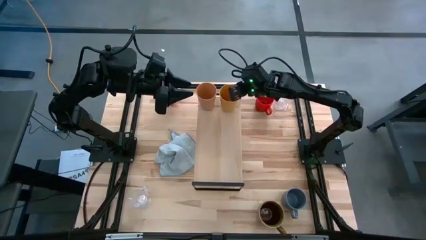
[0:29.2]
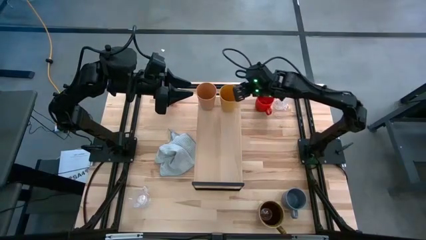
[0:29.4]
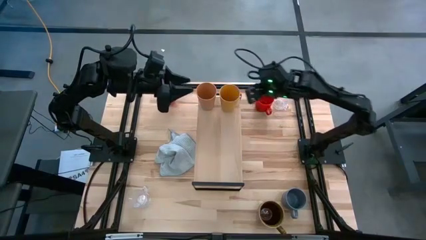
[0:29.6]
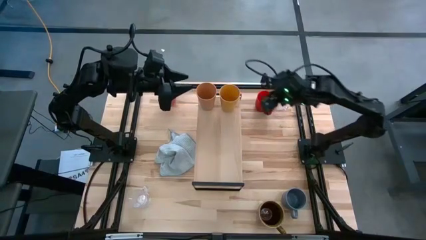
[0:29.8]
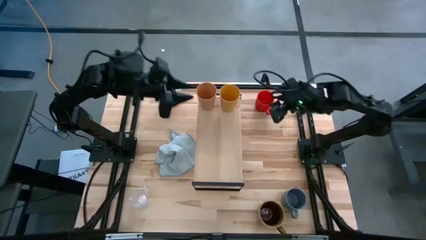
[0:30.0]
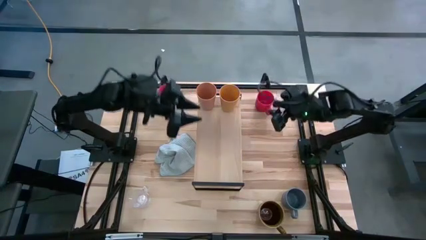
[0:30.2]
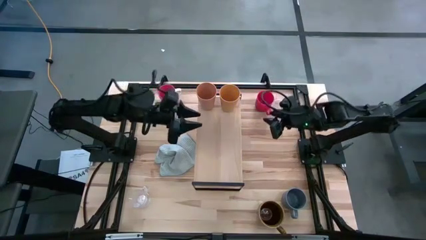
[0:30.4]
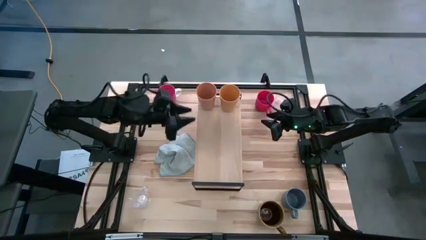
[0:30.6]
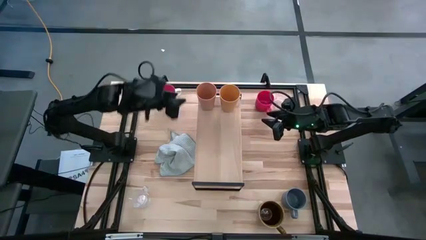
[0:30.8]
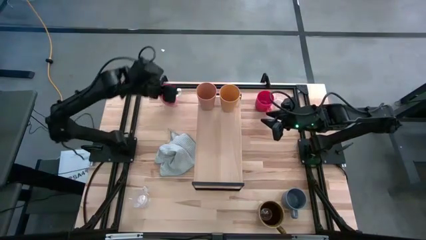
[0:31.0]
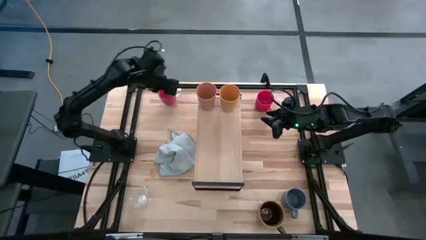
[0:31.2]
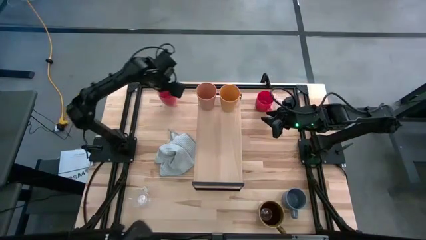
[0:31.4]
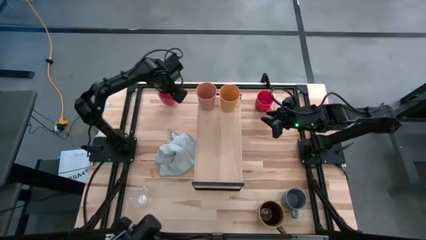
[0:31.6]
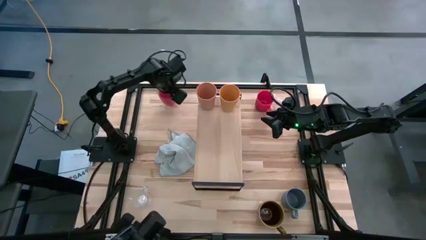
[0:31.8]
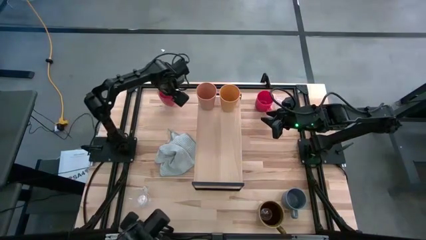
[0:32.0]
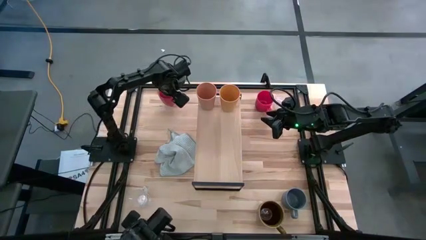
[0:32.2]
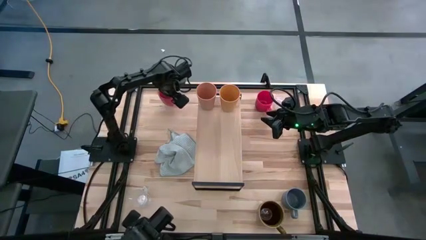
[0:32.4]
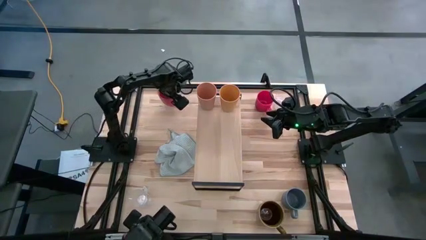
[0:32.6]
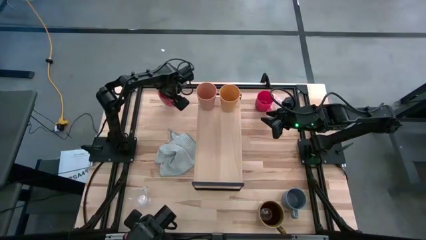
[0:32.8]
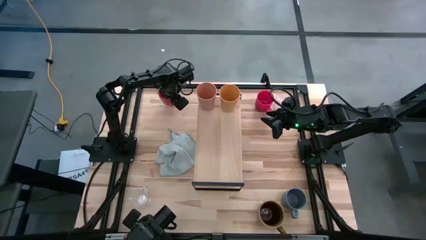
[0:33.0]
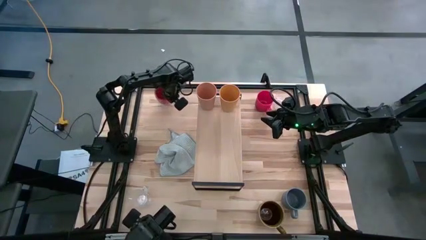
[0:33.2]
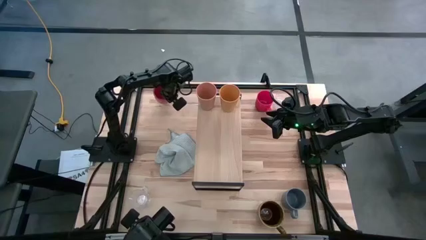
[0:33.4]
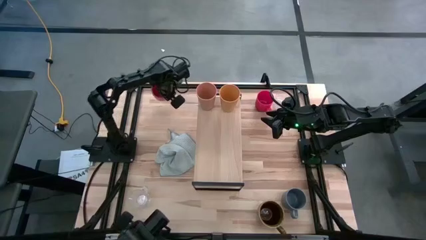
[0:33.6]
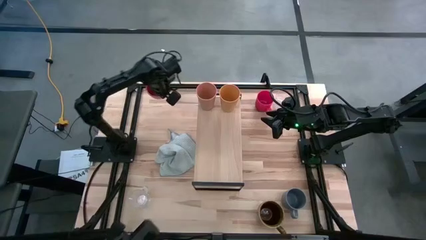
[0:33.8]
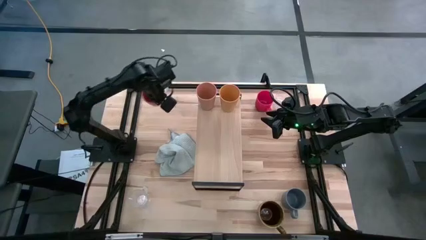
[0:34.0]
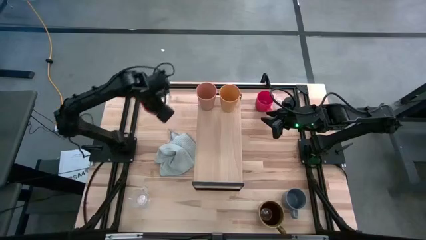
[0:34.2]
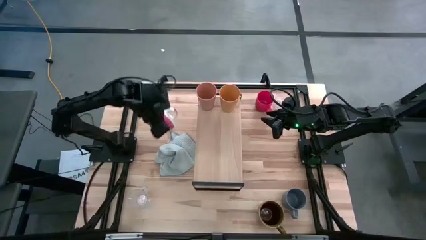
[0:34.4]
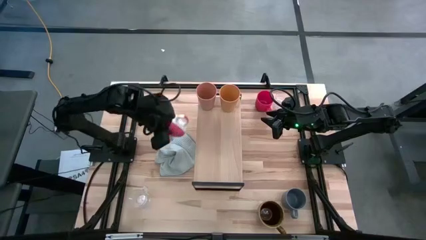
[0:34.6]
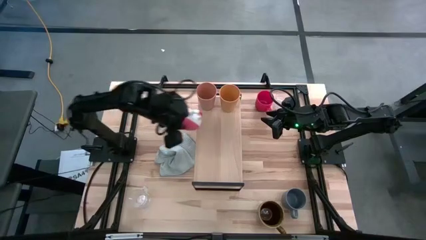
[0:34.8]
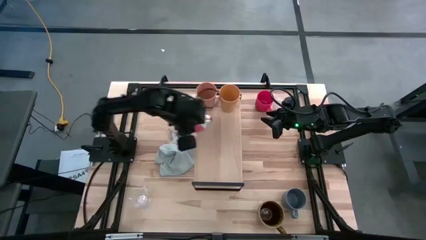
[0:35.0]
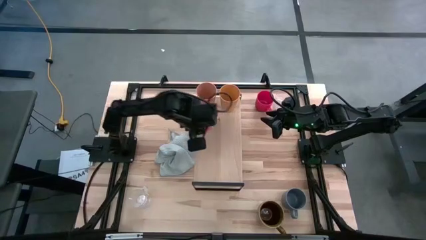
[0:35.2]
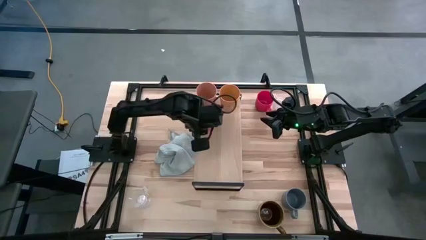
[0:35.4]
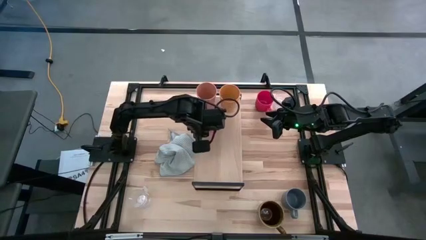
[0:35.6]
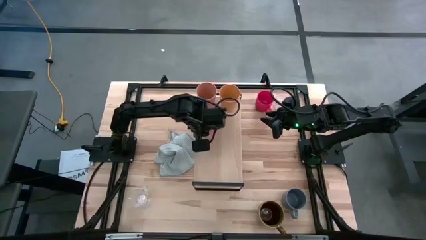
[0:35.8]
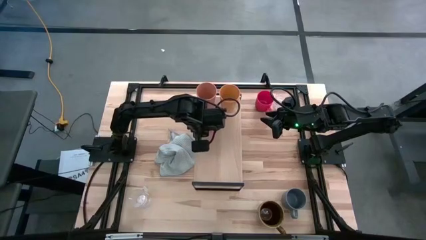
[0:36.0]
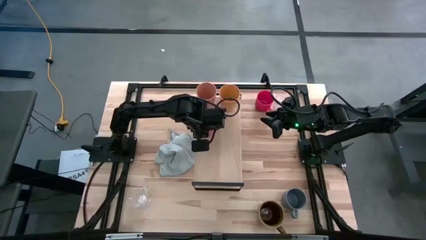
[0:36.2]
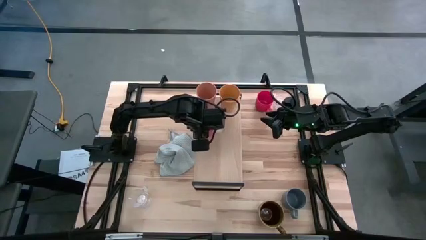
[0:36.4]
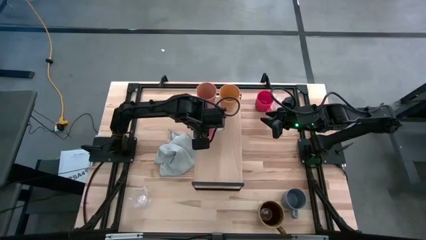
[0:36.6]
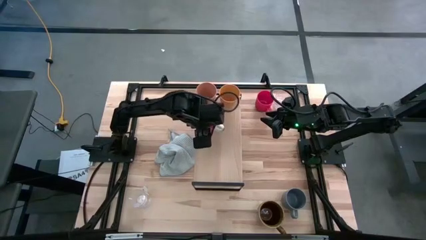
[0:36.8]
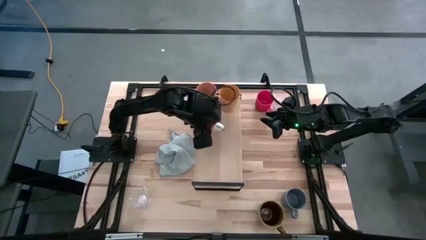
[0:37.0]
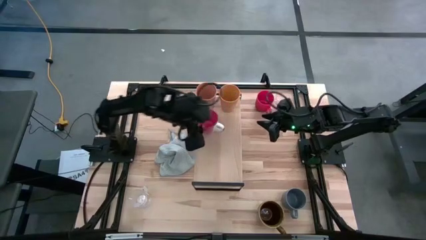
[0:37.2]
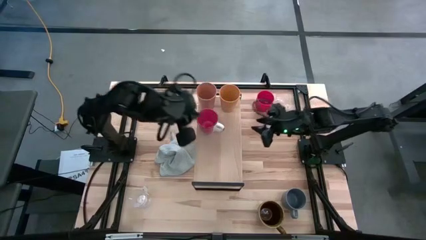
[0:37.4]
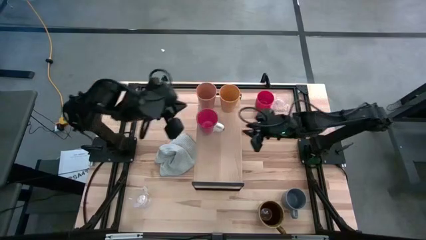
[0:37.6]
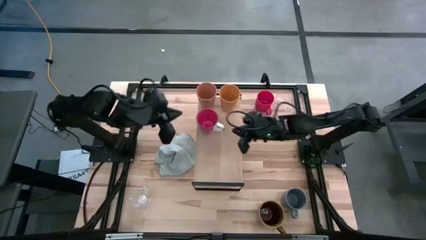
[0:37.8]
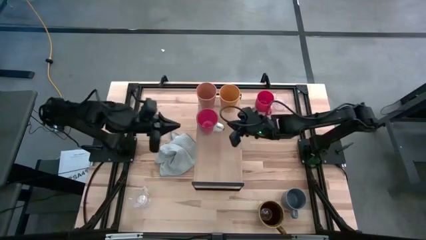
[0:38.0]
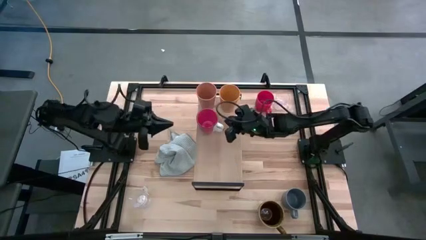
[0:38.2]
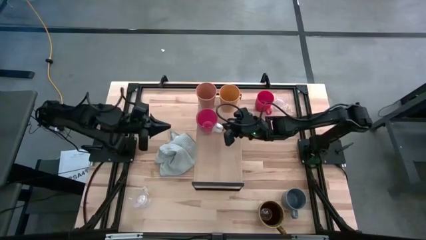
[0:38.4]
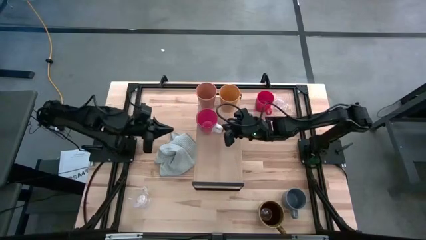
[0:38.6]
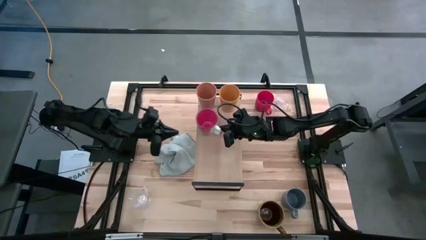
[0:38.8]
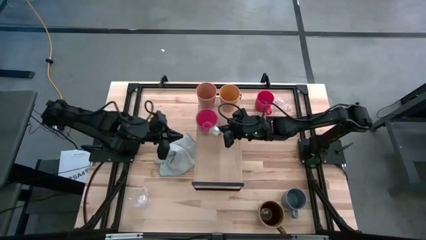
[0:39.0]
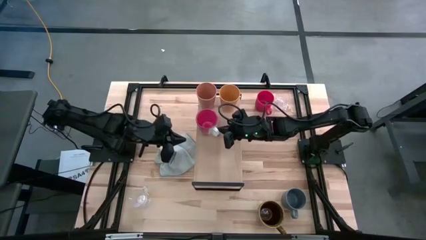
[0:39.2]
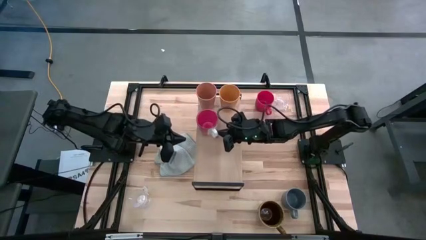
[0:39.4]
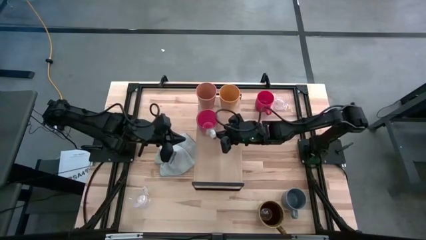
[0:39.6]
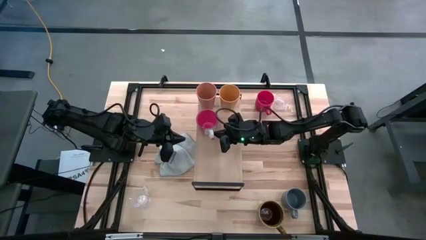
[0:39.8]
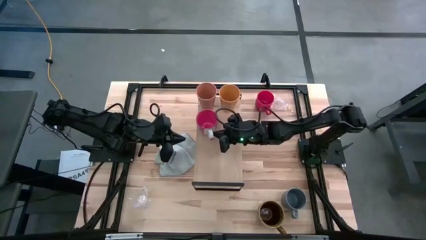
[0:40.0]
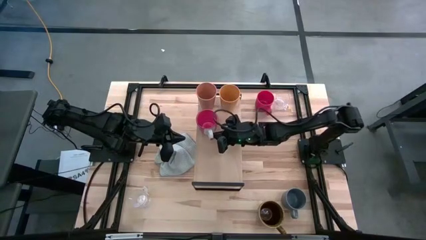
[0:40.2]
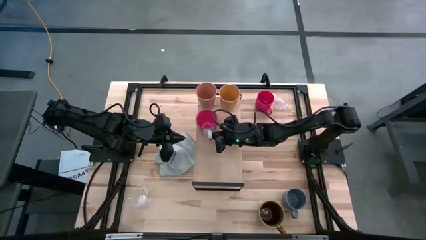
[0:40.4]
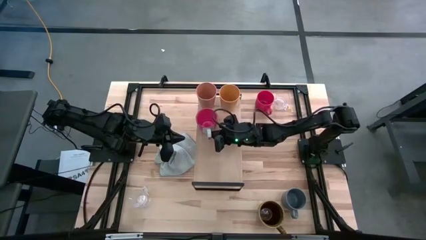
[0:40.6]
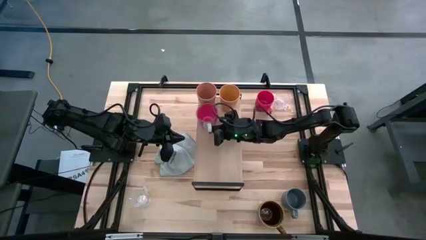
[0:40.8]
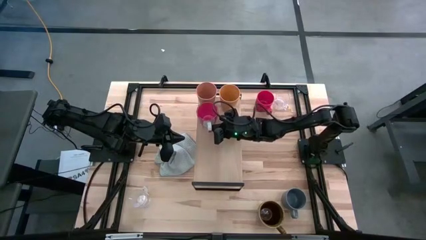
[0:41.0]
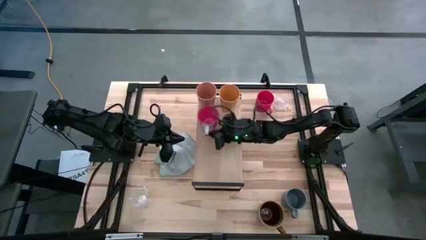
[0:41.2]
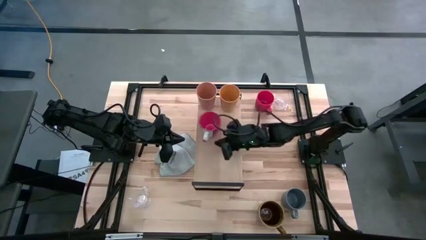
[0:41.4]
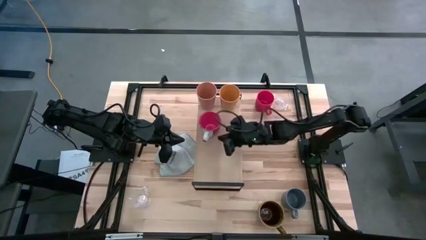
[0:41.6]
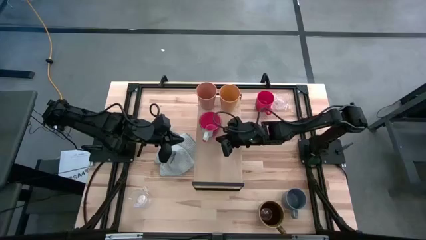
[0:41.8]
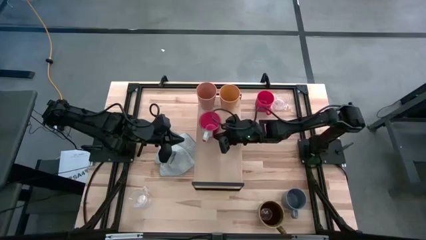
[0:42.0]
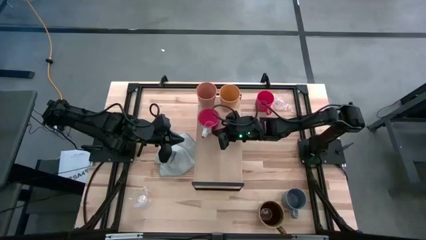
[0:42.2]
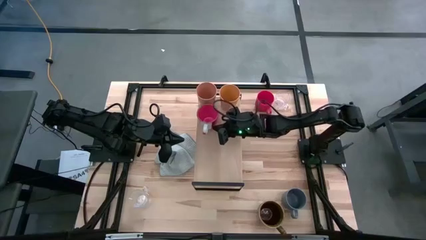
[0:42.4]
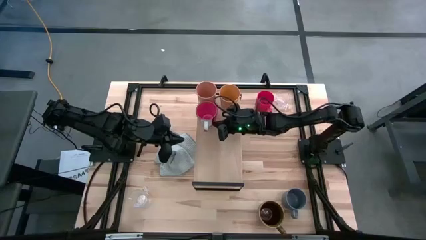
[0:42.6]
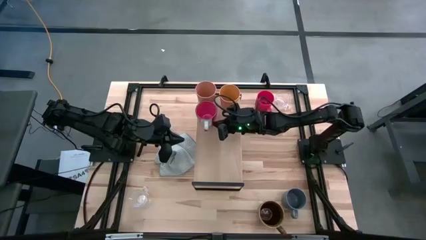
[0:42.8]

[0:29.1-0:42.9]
Task: Stack small to large cups/mugs on shelf
Put the pink mug on the shelf

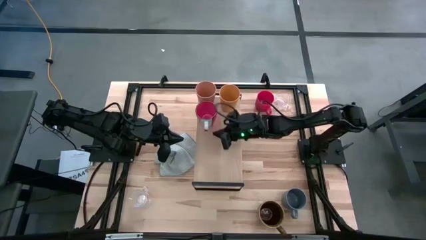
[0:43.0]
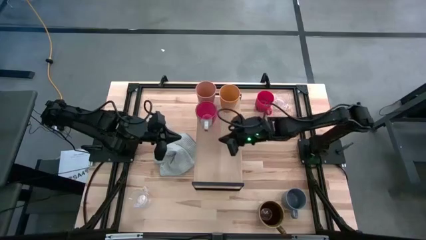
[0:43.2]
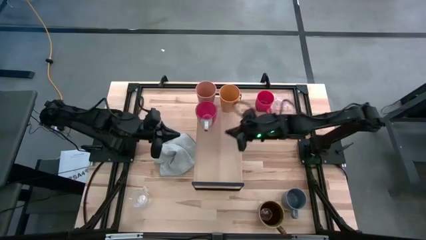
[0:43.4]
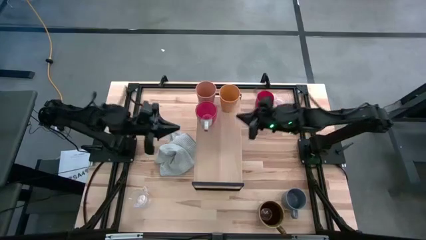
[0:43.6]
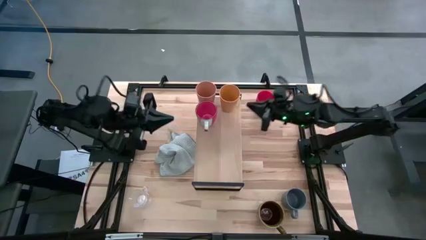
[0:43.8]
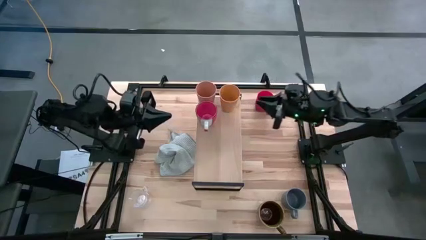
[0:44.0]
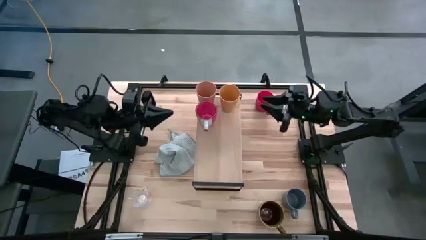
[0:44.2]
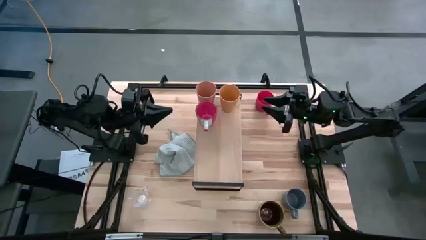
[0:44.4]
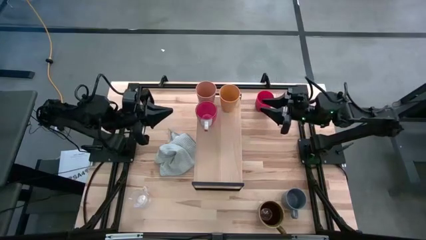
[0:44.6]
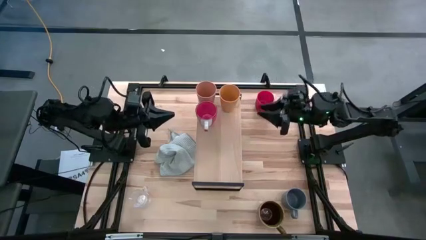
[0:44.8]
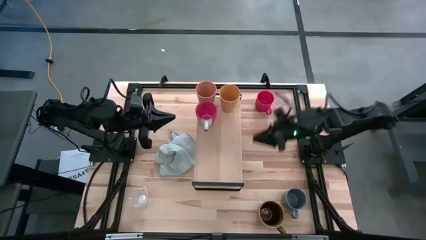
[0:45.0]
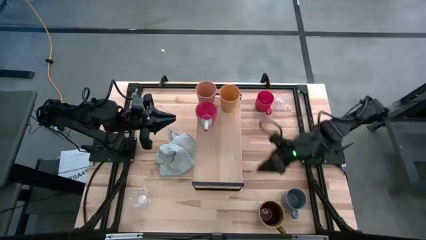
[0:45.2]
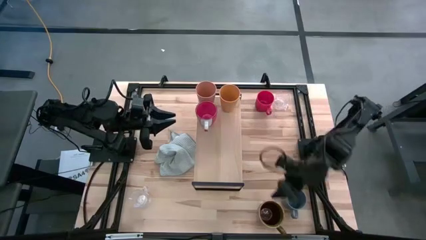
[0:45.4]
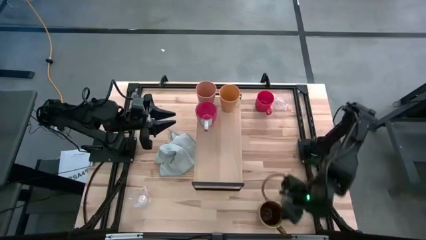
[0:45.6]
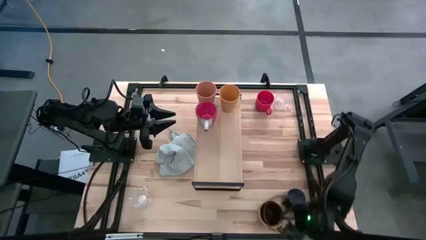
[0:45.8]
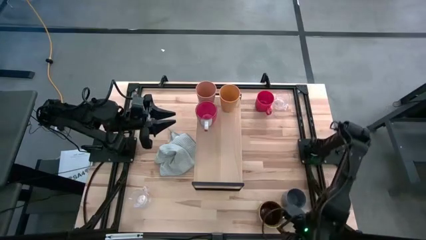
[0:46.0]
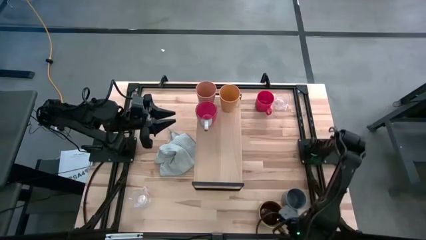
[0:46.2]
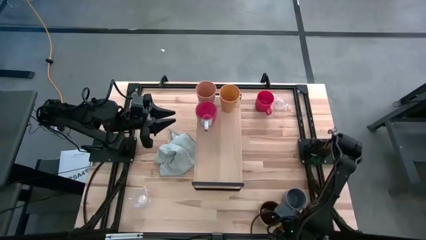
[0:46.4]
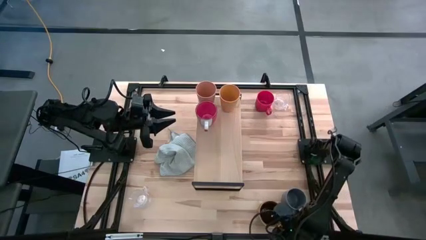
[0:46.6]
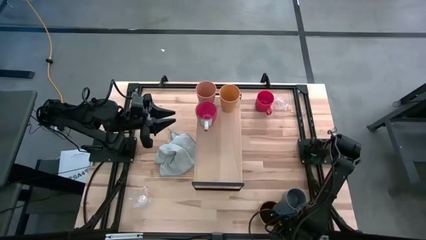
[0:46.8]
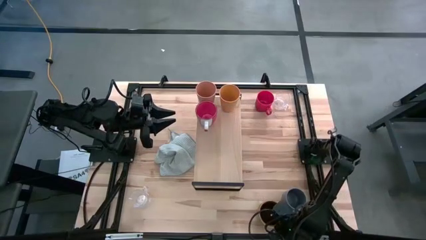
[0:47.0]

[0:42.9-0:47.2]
Put the brown mug on the shelf
